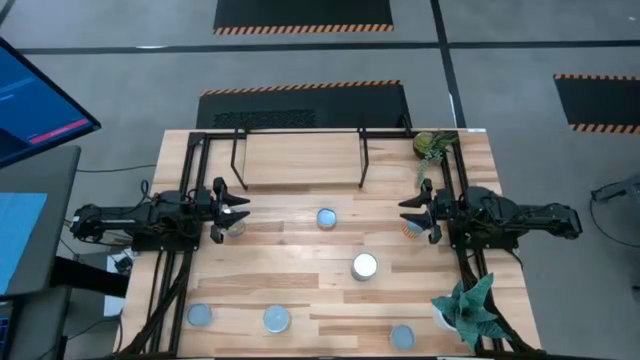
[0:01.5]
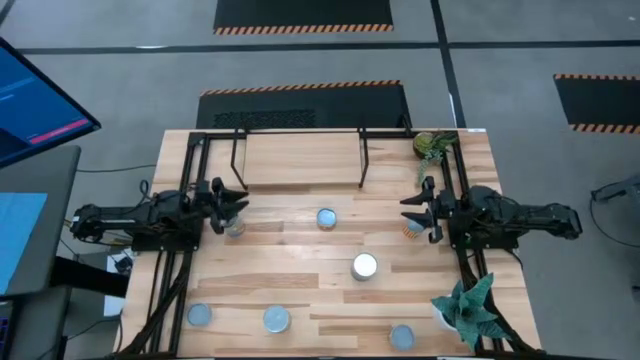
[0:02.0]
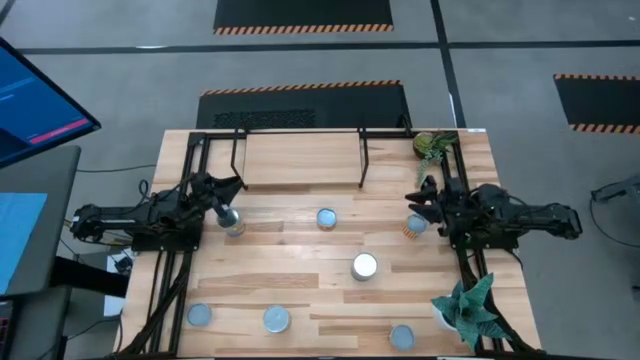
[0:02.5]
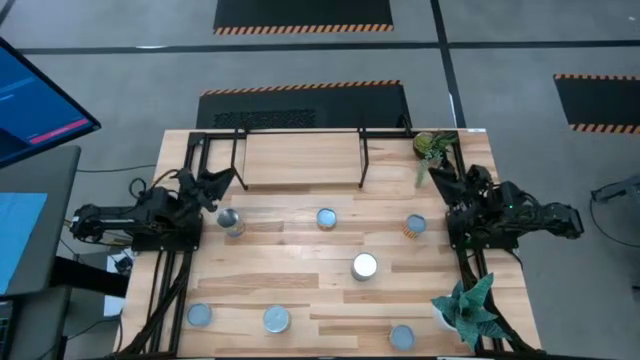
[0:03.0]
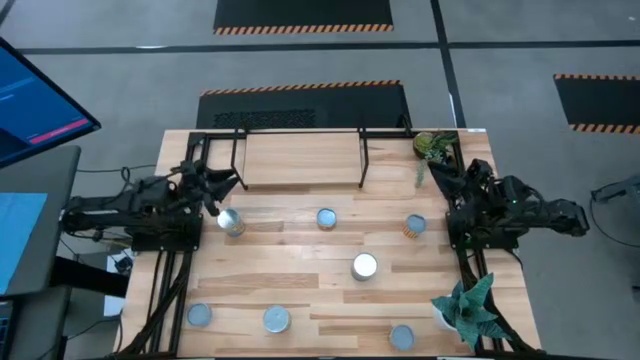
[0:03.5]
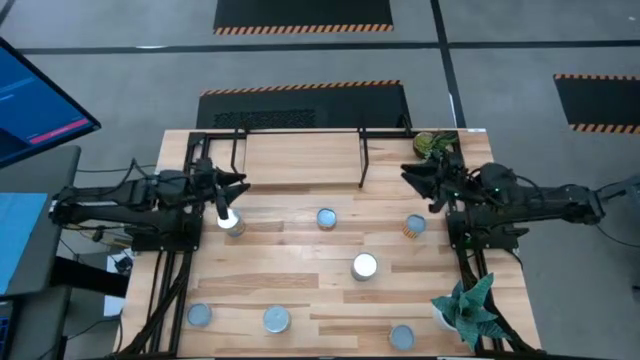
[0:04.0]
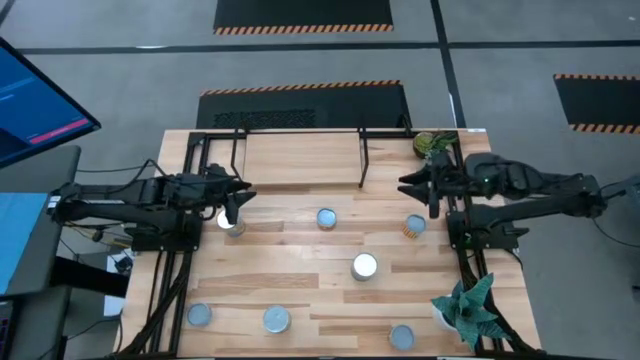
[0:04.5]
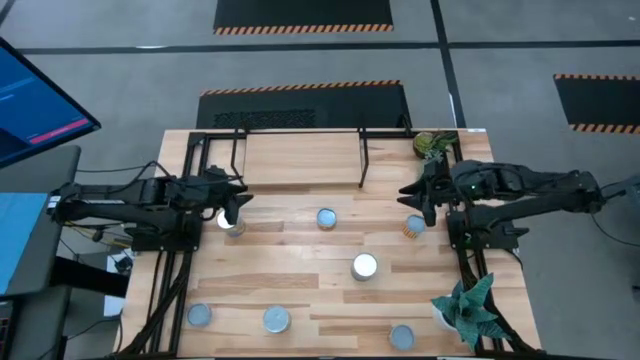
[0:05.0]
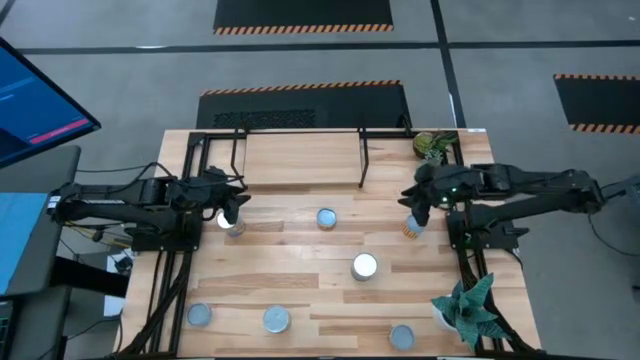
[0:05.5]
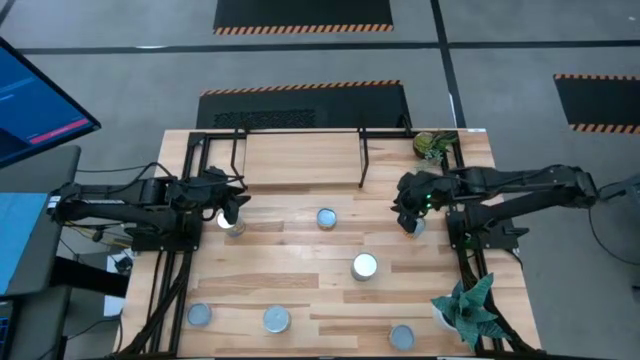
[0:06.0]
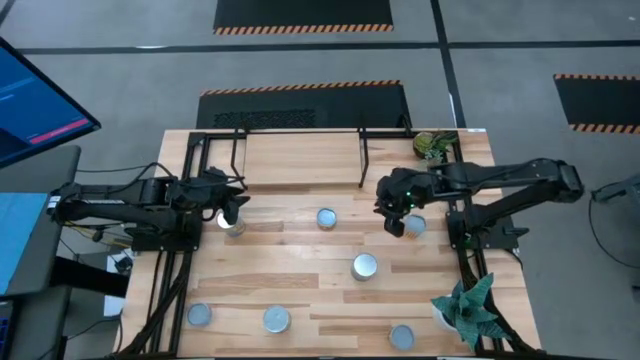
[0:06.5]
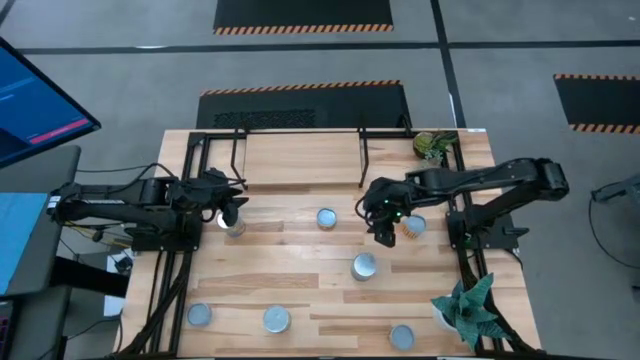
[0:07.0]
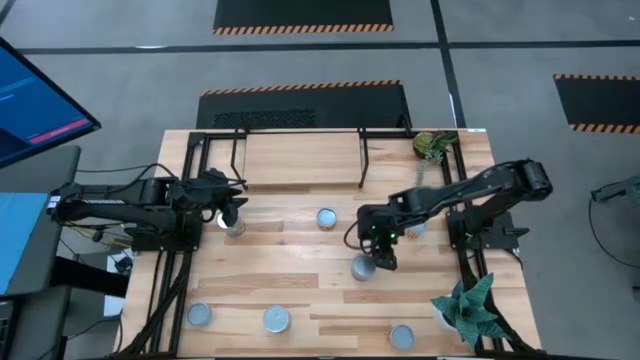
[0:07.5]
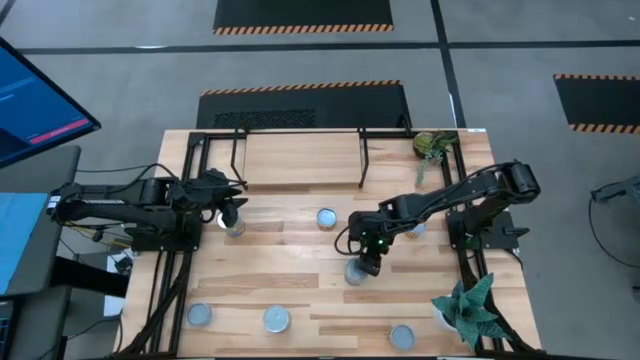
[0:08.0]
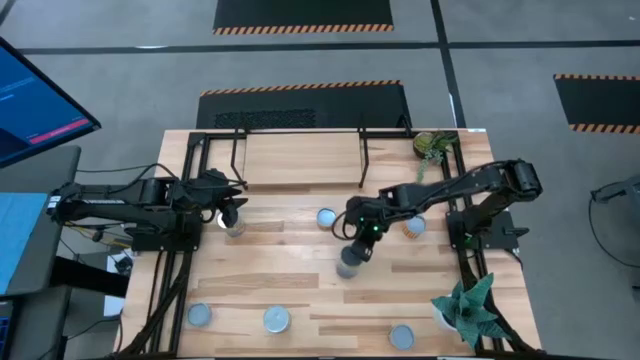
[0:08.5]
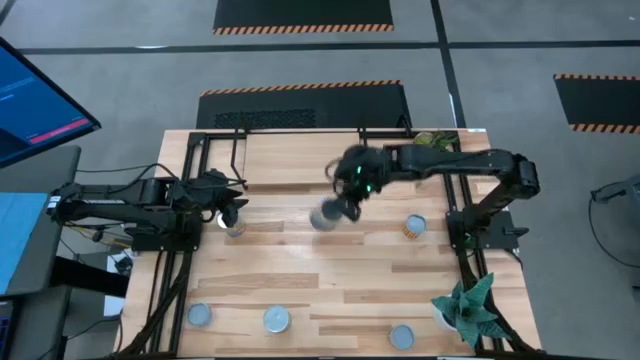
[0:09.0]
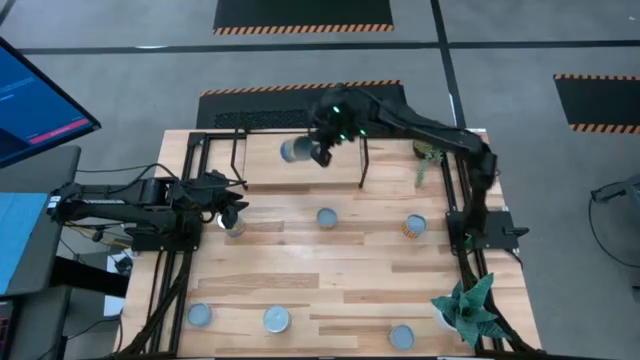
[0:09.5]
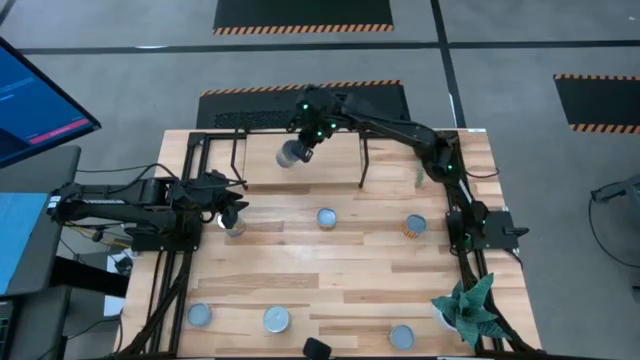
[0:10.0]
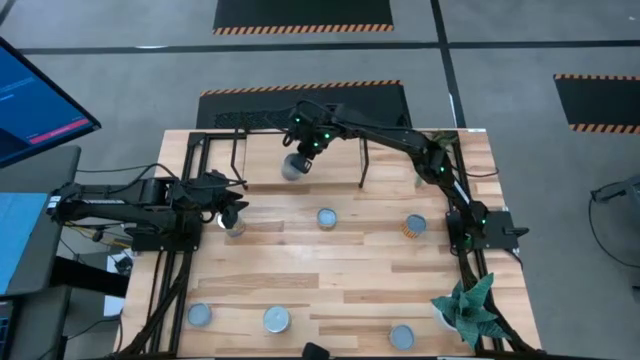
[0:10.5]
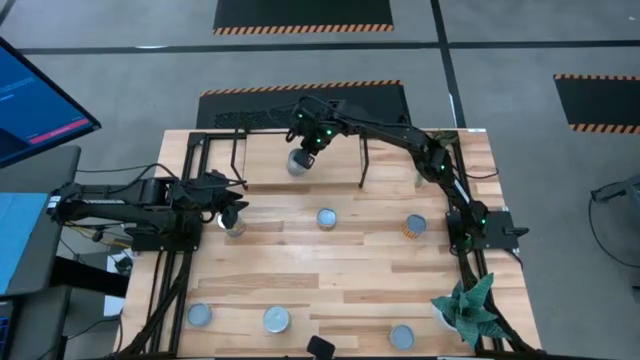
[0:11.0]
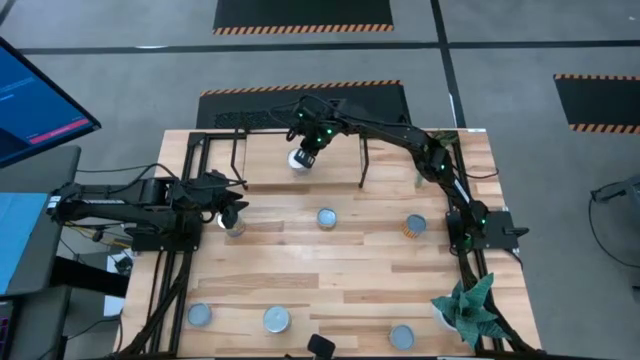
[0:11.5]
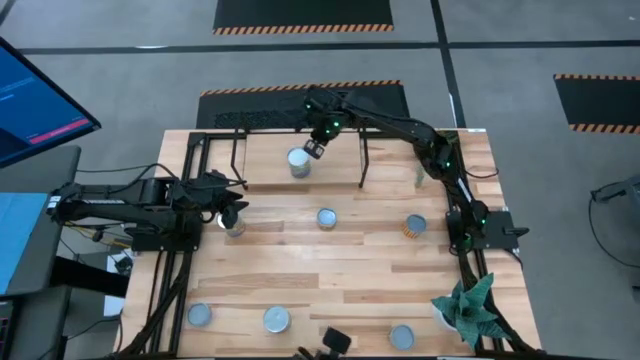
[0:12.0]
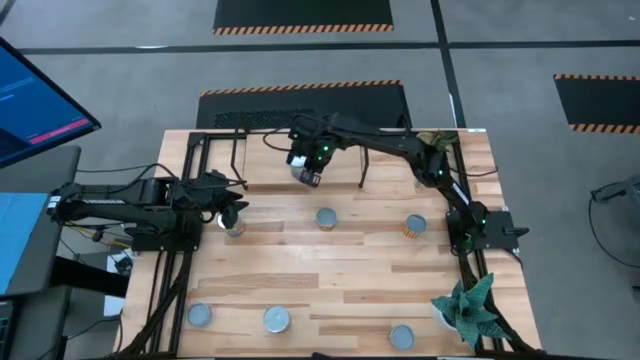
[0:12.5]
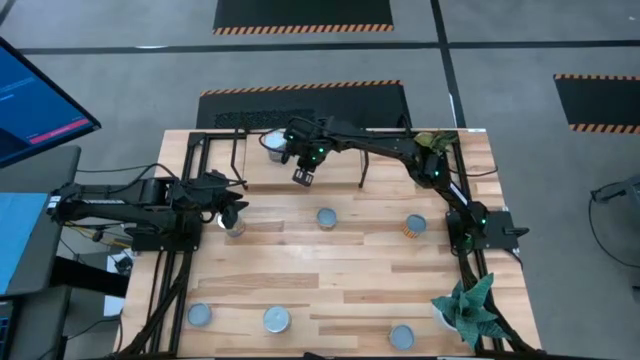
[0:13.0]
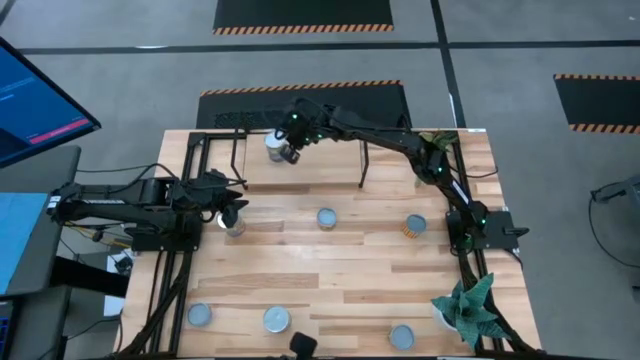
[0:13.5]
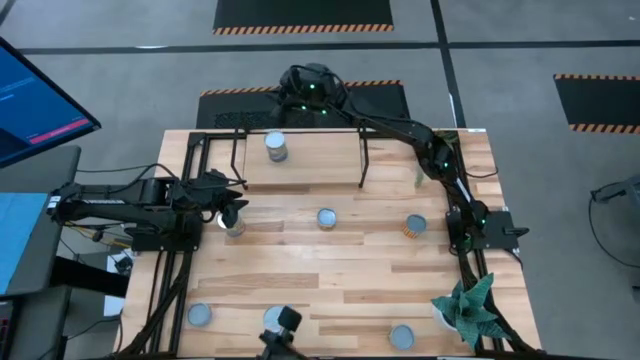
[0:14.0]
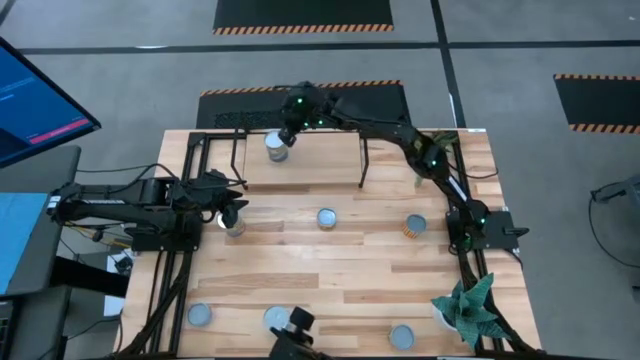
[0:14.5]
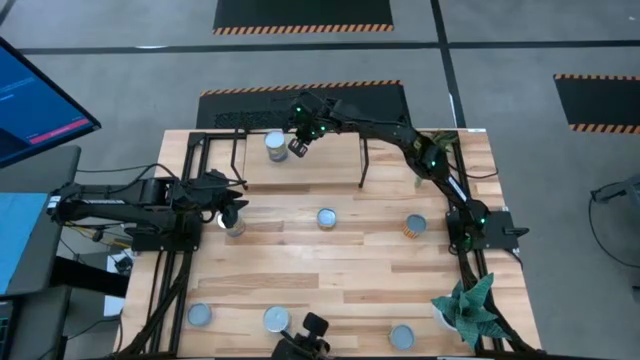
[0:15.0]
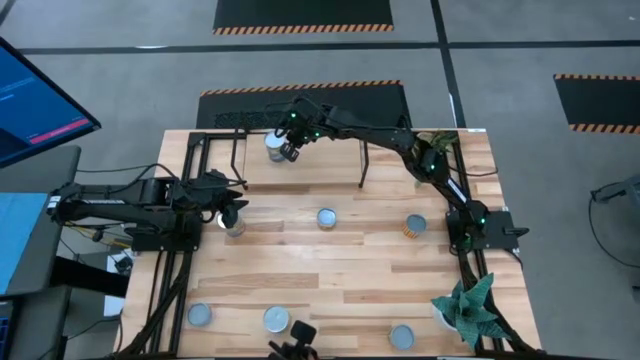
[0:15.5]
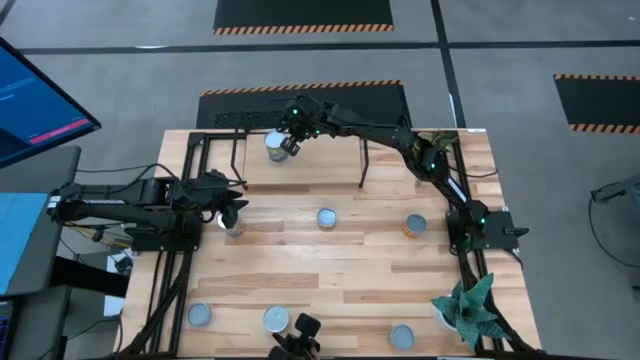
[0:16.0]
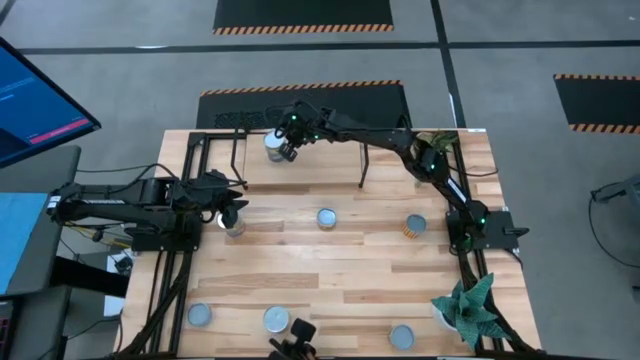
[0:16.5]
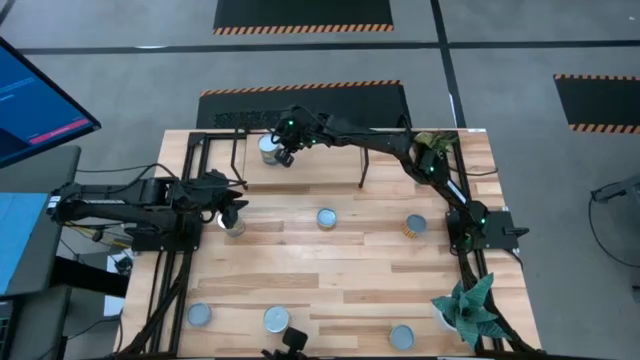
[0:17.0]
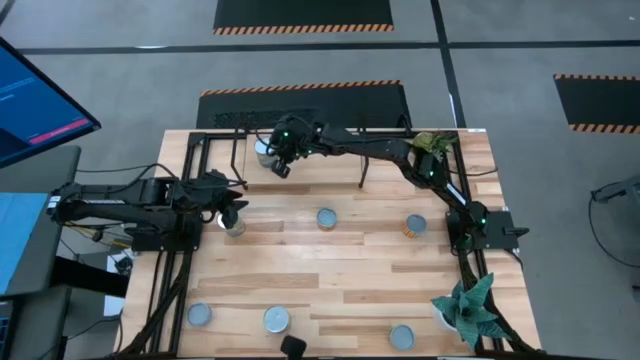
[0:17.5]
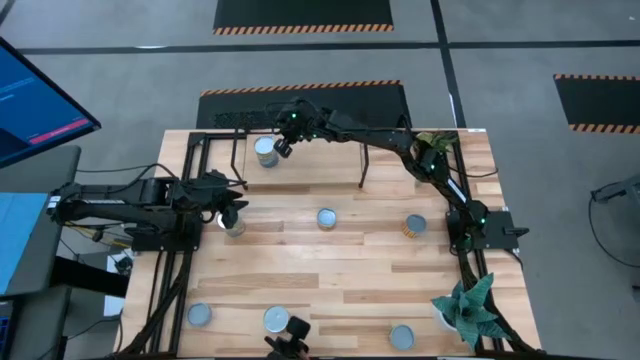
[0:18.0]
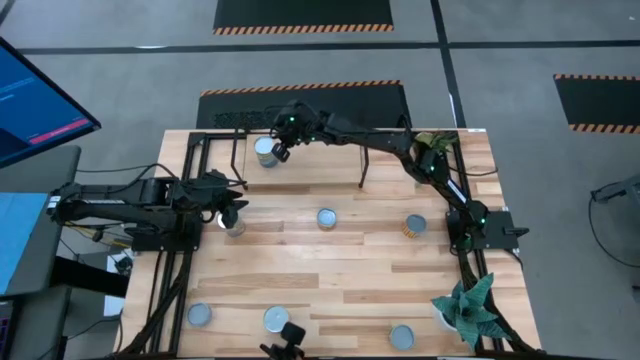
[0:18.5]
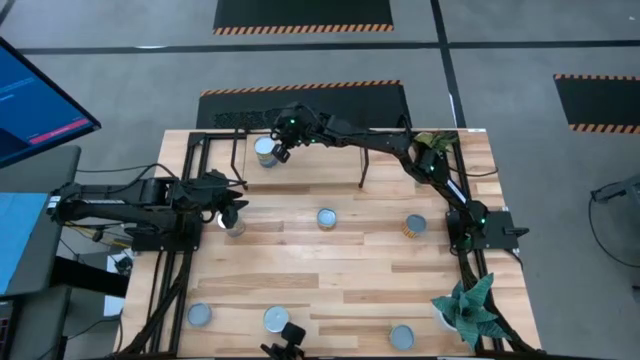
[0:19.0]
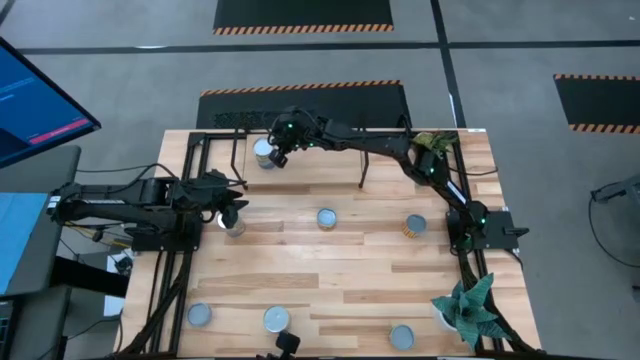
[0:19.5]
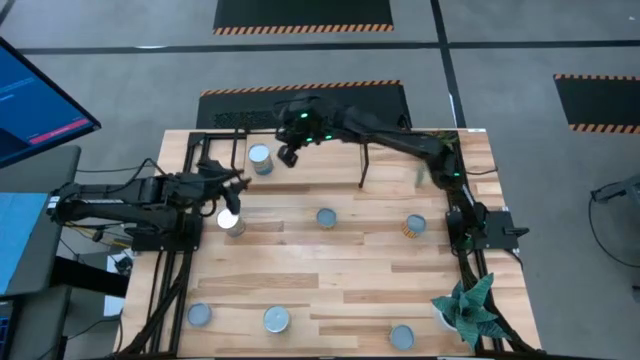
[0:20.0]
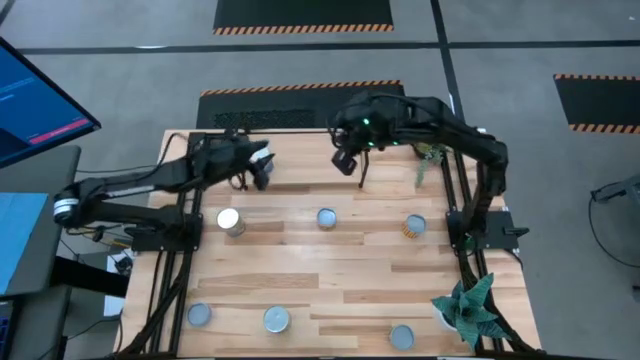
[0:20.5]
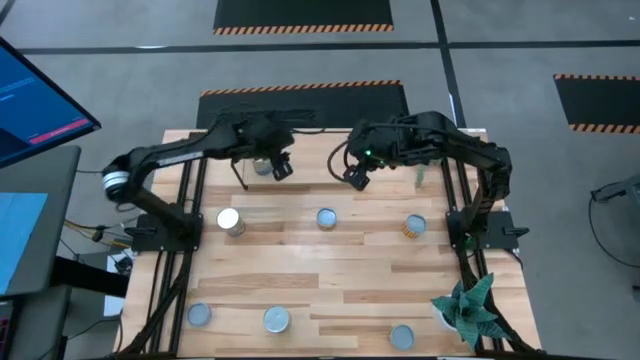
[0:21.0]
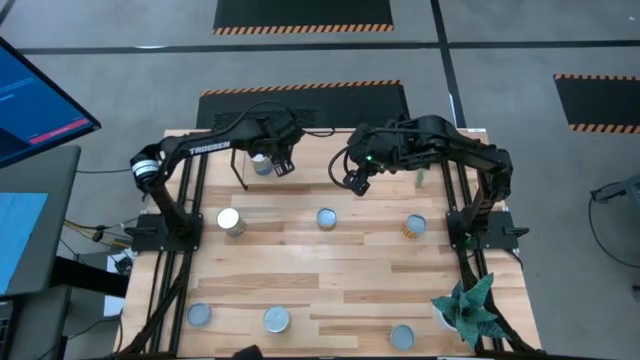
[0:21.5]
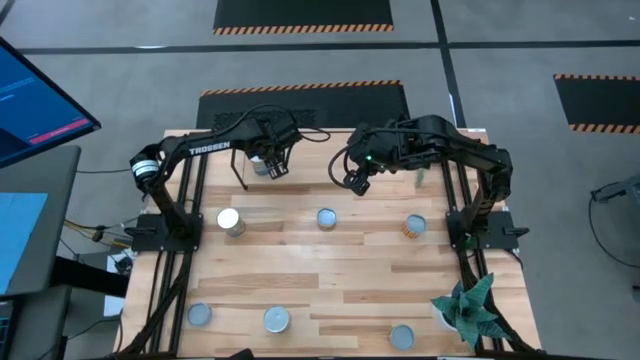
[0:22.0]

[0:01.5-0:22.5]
Task: Pick and place cans onto a shelf
Put the canned peas on the shelf
